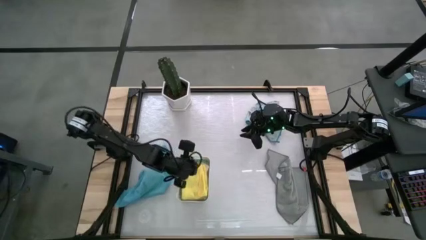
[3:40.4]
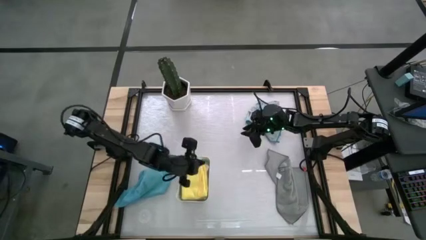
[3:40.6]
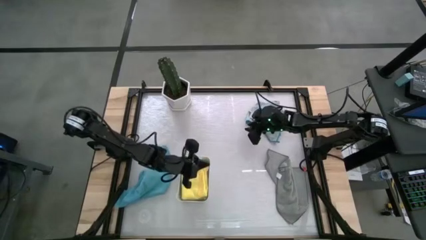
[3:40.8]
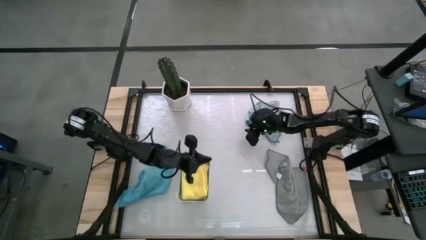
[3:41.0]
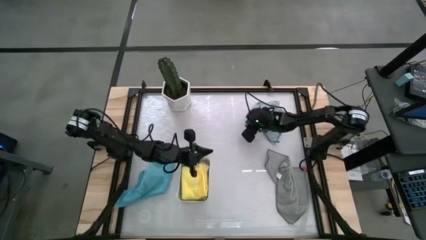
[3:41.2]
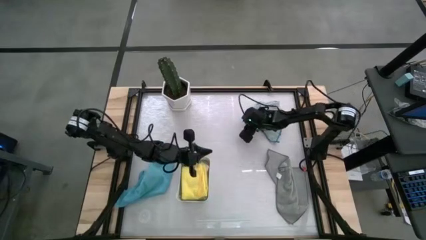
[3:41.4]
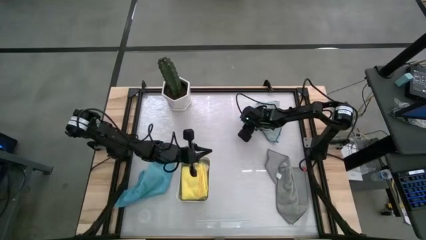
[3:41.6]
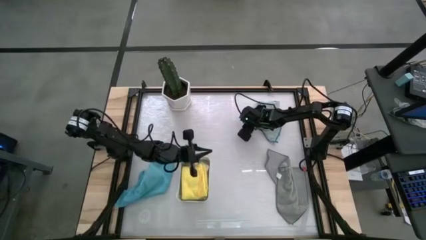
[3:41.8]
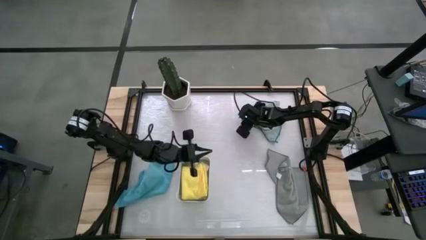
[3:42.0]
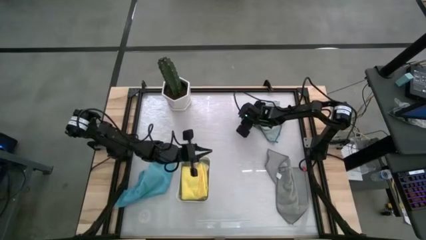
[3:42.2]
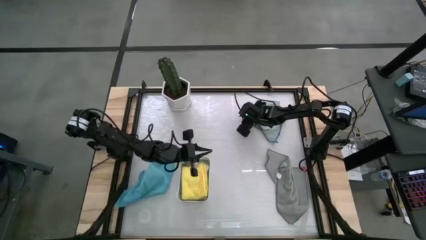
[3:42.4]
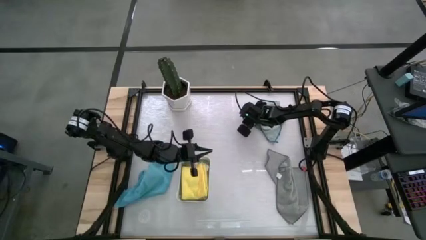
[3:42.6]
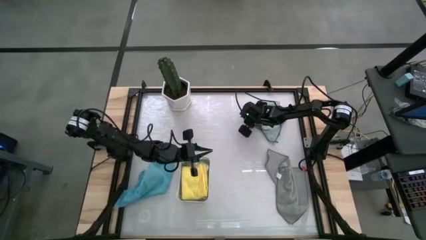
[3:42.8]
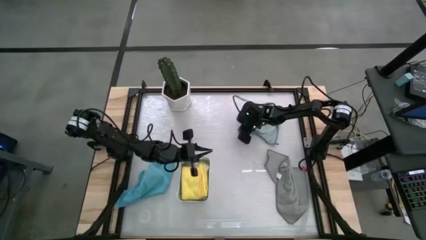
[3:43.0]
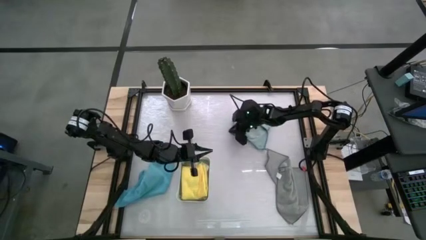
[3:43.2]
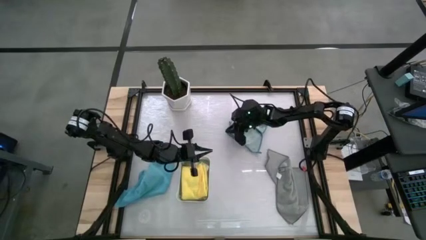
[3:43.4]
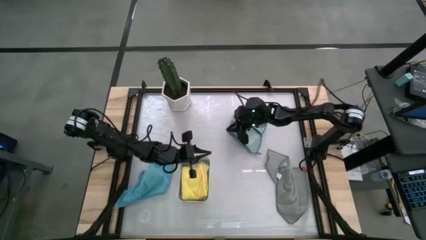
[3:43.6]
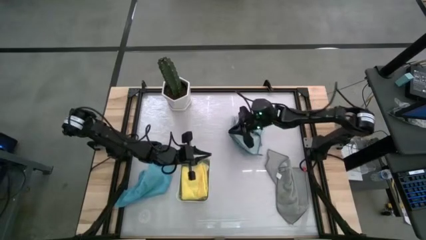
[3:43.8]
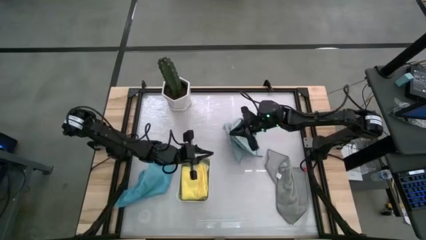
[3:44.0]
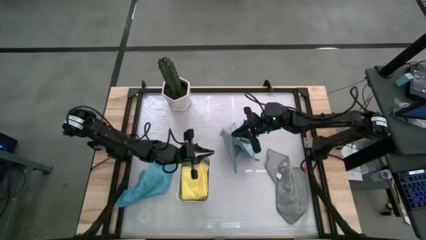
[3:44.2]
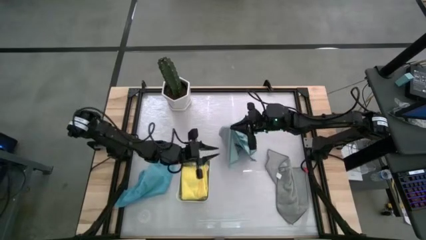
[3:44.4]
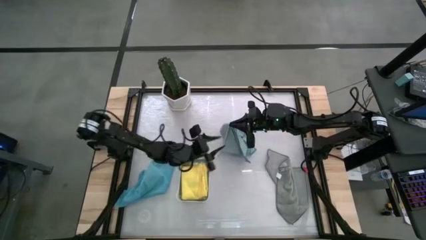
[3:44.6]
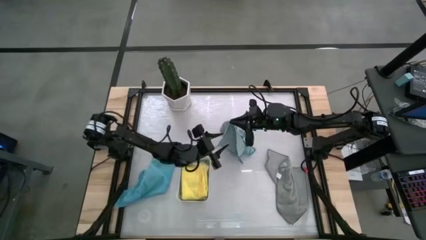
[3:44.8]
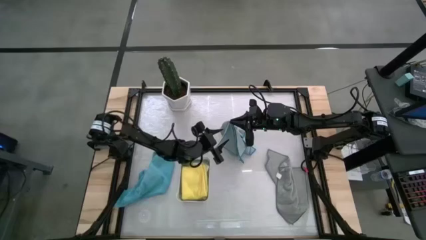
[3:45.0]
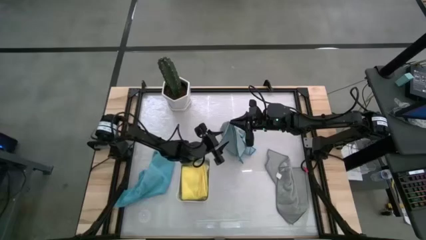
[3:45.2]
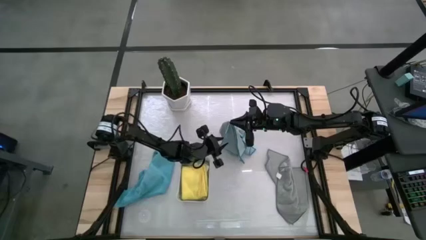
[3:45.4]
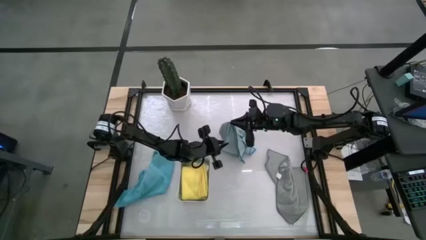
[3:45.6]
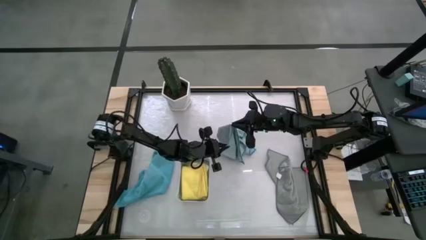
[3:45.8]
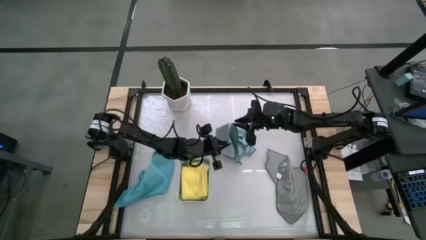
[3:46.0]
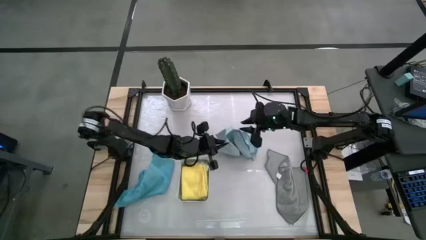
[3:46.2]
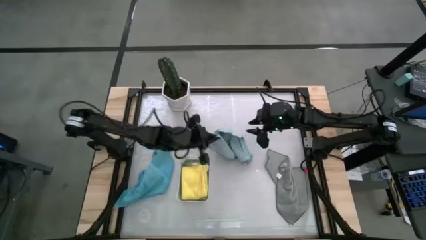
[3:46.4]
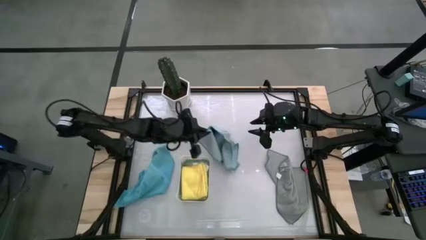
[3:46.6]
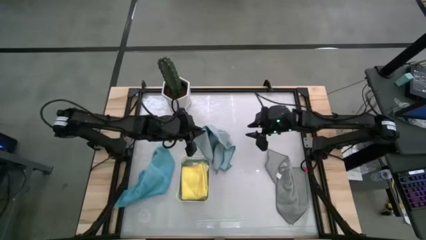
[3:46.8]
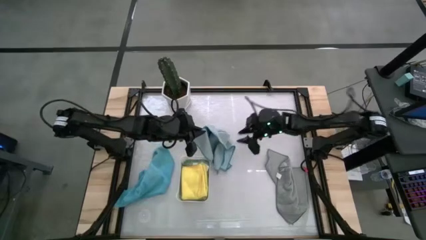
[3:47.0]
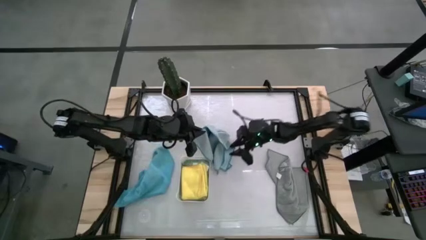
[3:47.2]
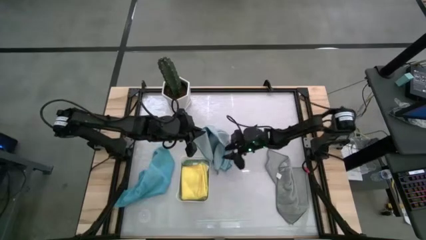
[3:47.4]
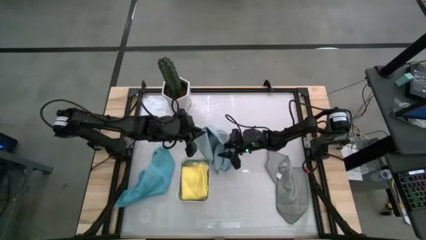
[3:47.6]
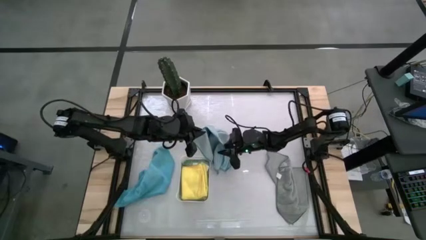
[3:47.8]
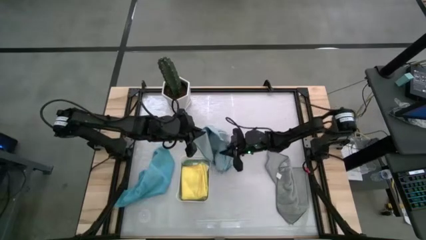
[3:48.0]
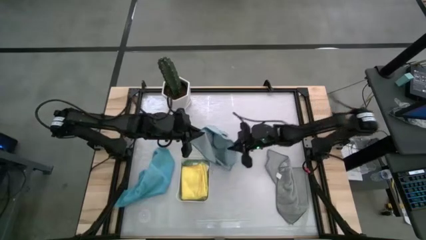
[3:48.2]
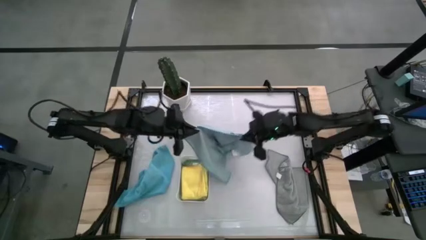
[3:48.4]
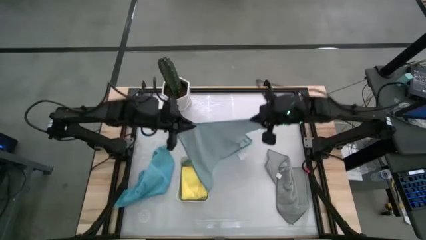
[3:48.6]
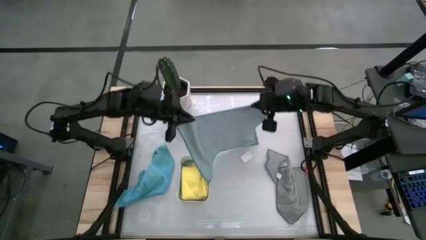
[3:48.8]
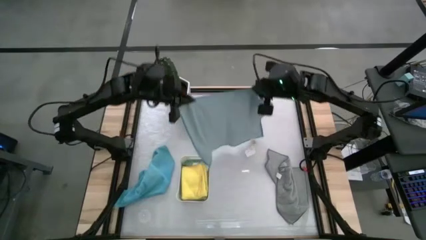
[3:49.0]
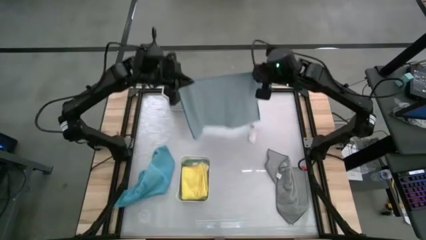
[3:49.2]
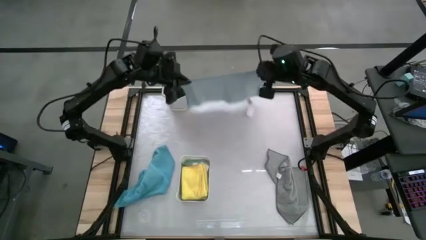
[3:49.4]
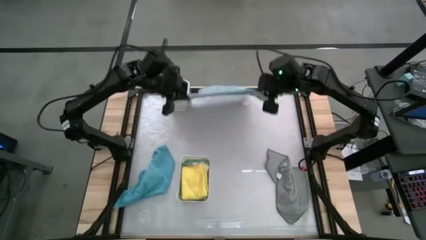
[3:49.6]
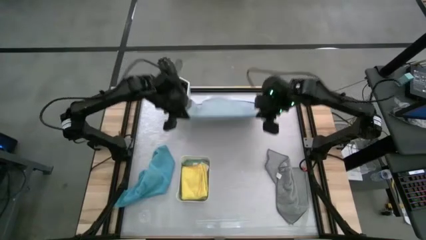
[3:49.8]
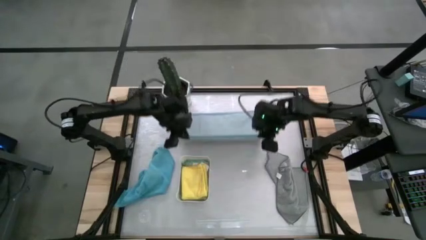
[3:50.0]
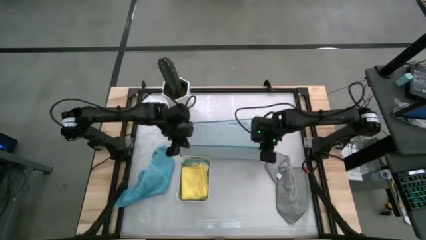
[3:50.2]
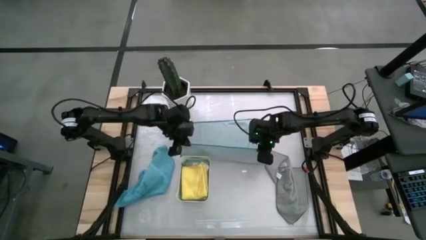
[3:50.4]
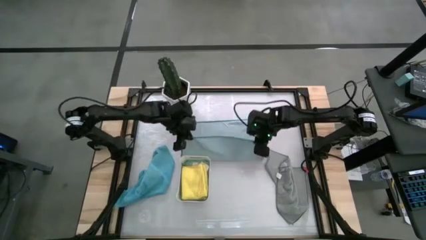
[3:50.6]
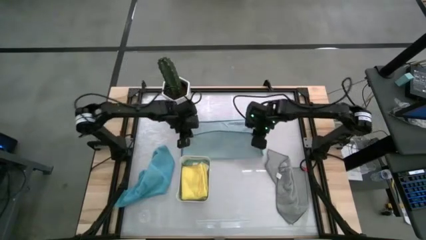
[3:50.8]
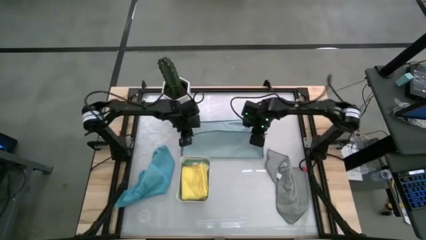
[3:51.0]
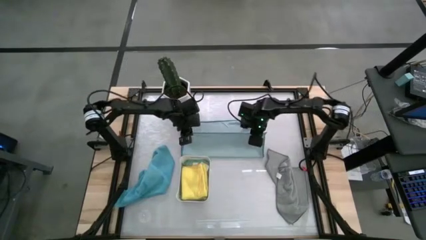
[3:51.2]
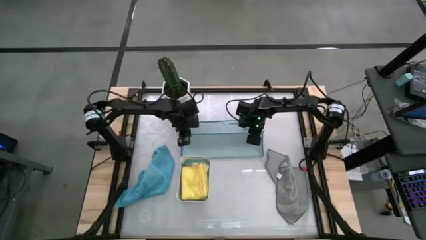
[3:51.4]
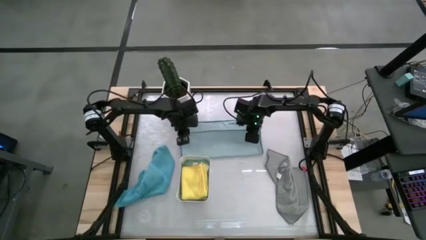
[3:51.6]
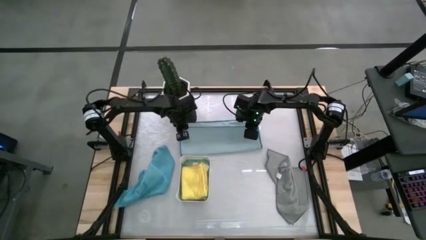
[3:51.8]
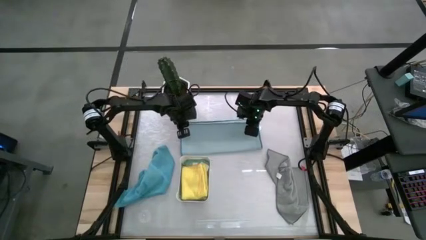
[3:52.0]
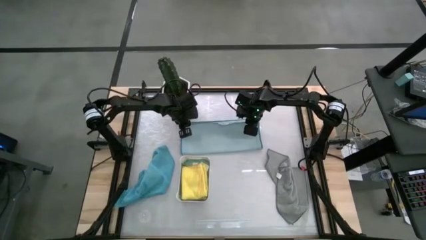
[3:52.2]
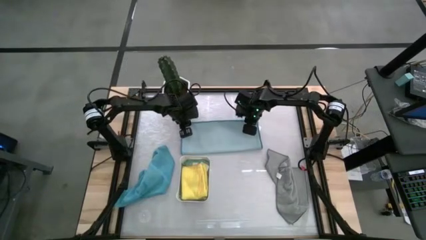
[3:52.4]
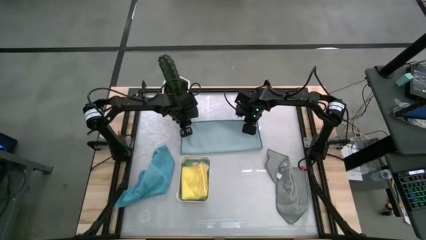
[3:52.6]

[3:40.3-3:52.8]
Task: Fold microfiber towels
Fold the light blue microfiber towel
